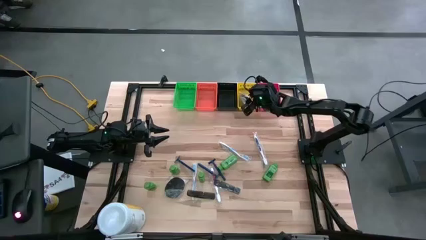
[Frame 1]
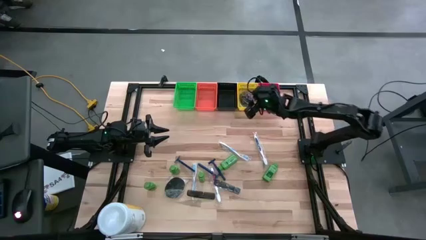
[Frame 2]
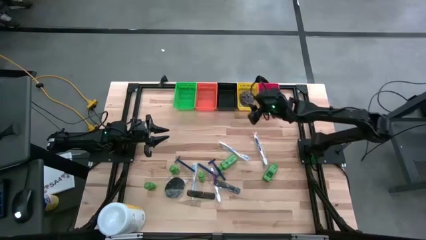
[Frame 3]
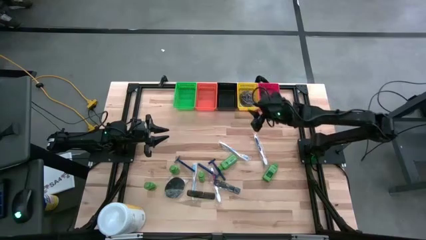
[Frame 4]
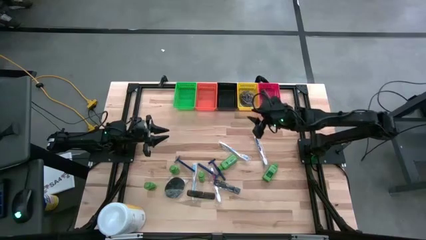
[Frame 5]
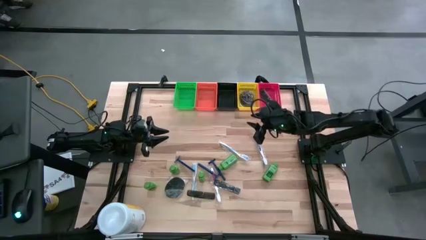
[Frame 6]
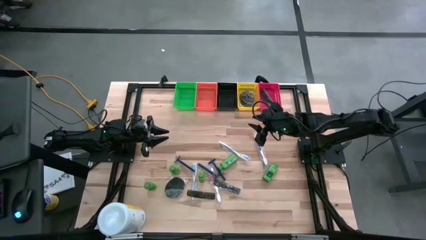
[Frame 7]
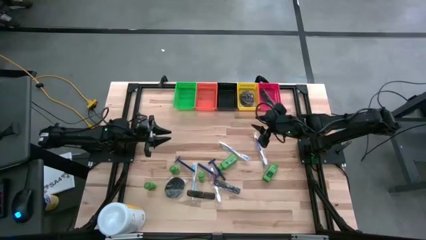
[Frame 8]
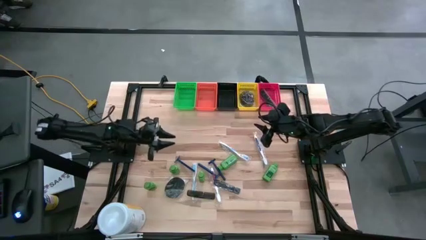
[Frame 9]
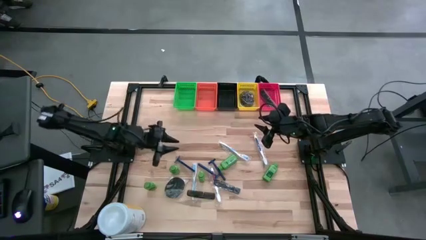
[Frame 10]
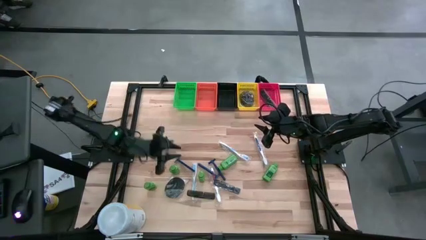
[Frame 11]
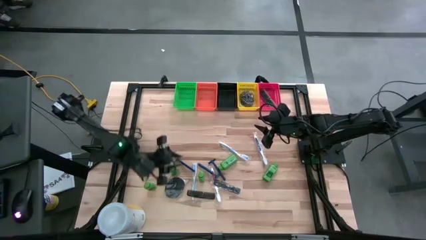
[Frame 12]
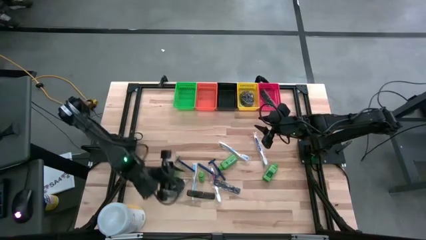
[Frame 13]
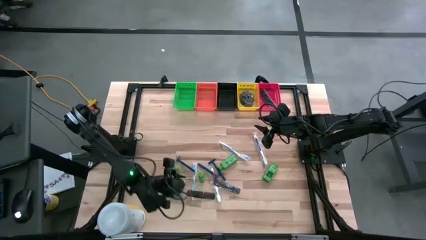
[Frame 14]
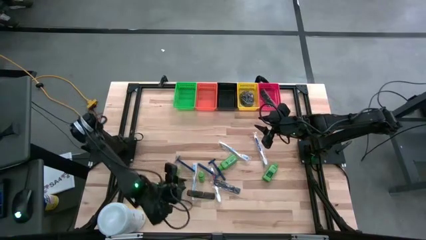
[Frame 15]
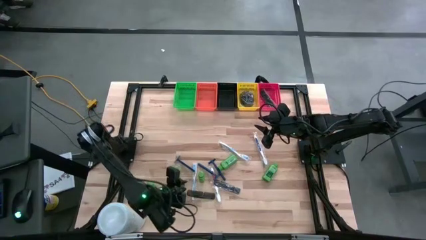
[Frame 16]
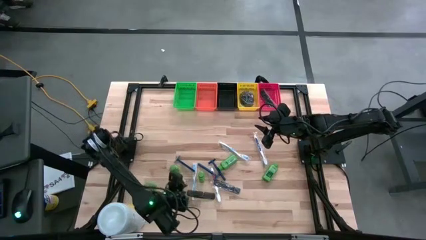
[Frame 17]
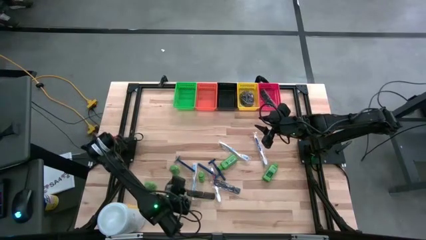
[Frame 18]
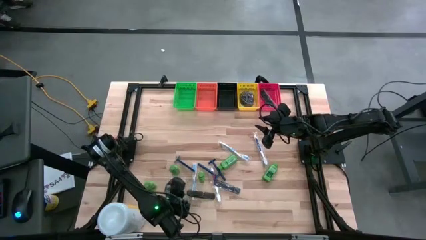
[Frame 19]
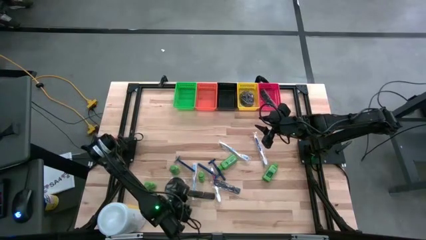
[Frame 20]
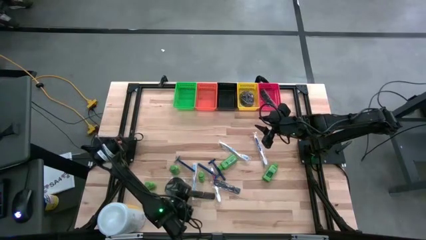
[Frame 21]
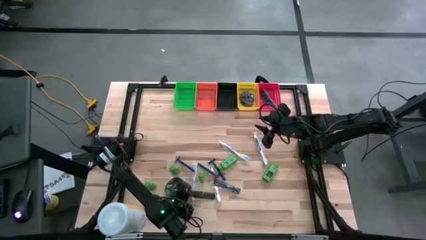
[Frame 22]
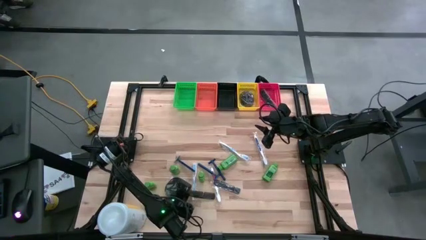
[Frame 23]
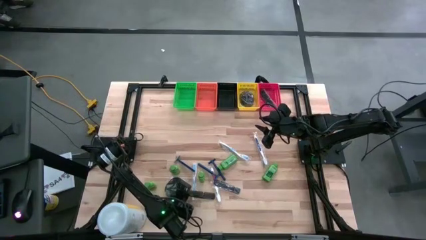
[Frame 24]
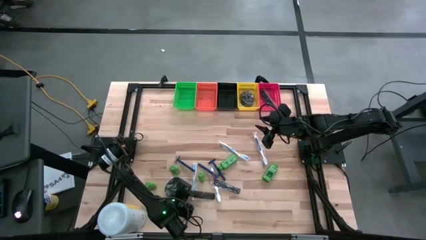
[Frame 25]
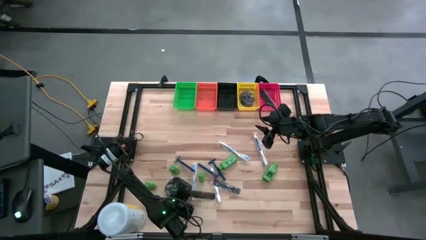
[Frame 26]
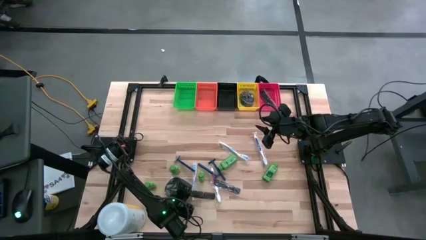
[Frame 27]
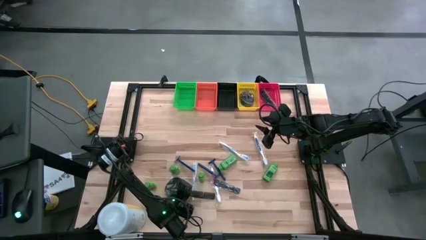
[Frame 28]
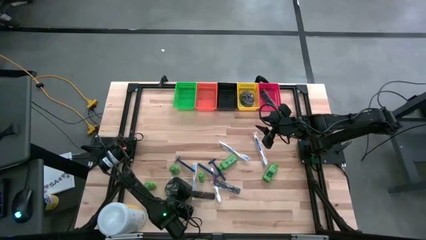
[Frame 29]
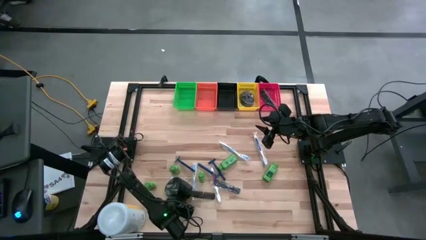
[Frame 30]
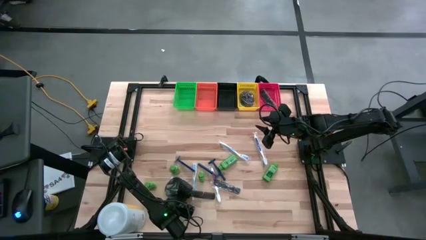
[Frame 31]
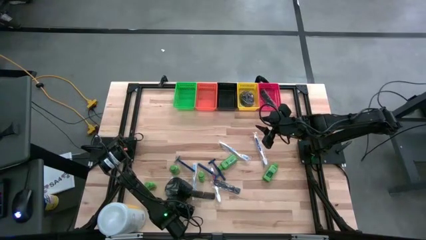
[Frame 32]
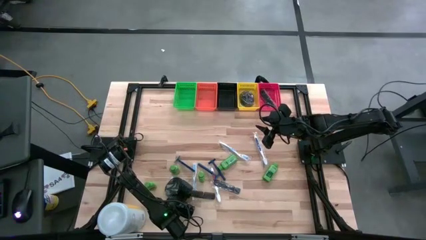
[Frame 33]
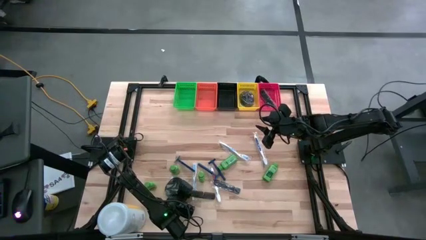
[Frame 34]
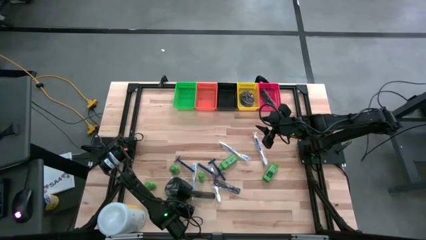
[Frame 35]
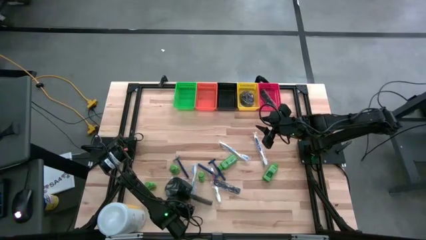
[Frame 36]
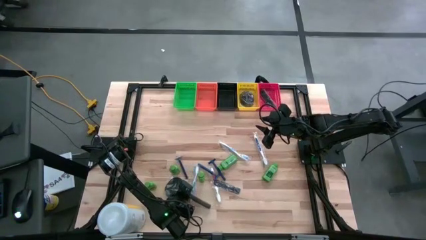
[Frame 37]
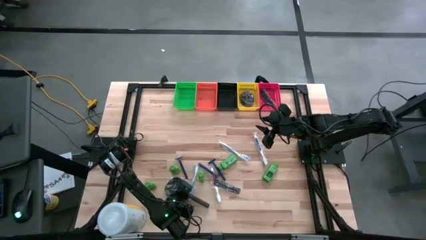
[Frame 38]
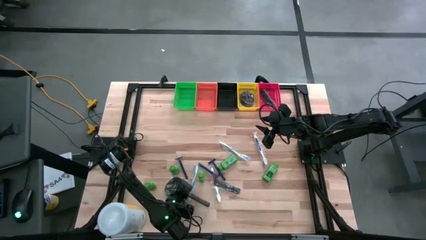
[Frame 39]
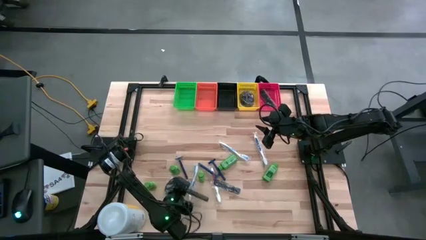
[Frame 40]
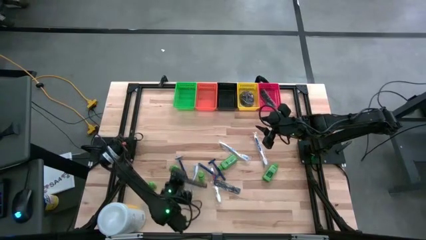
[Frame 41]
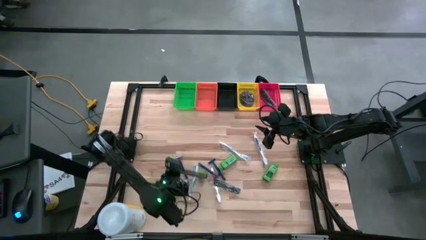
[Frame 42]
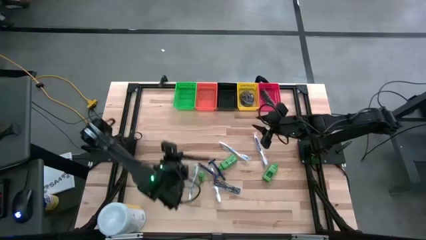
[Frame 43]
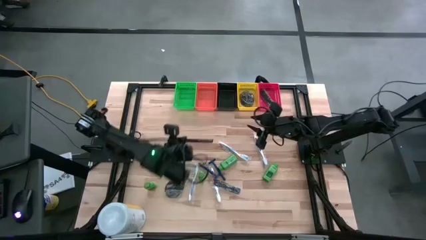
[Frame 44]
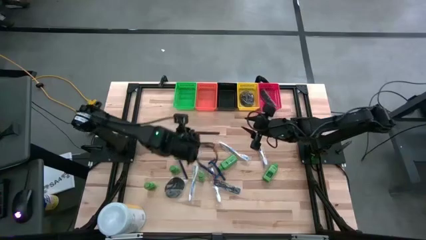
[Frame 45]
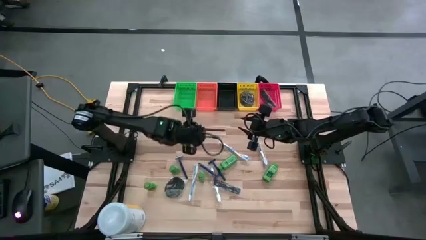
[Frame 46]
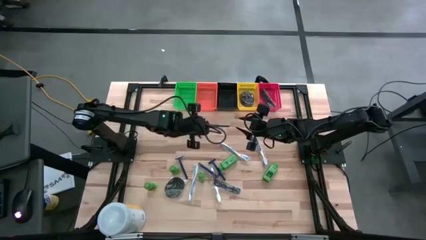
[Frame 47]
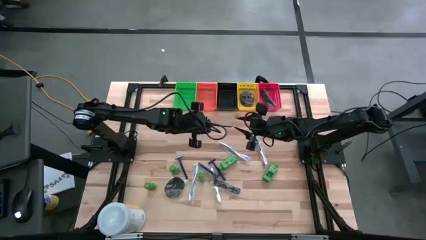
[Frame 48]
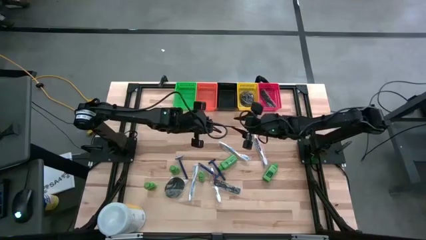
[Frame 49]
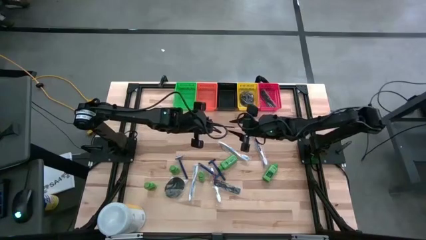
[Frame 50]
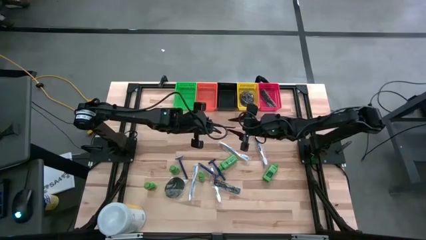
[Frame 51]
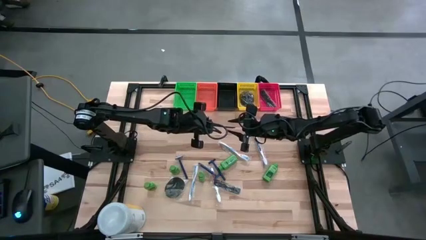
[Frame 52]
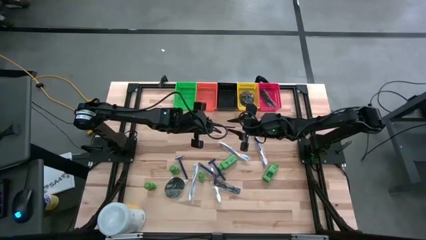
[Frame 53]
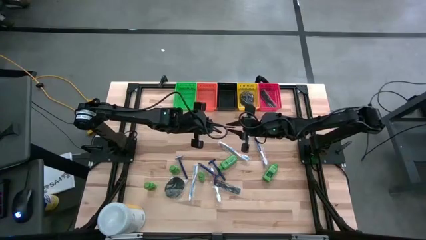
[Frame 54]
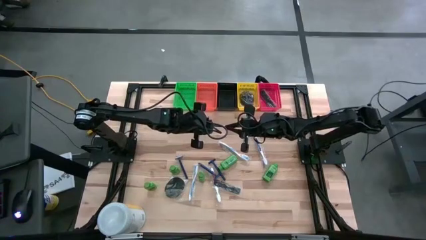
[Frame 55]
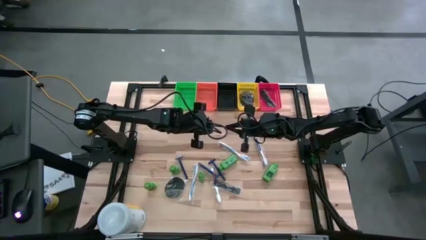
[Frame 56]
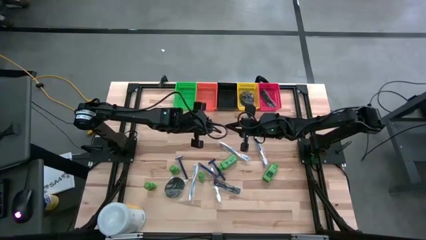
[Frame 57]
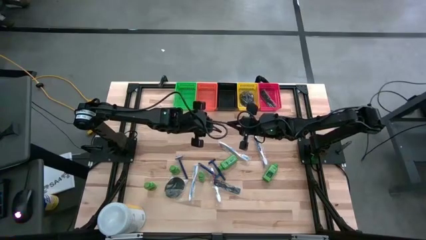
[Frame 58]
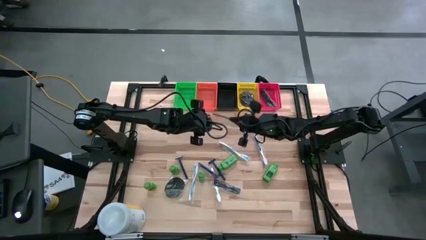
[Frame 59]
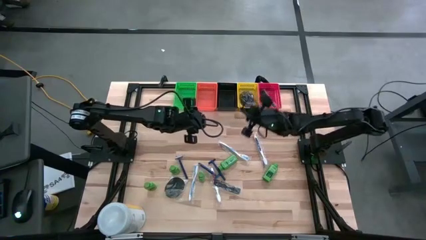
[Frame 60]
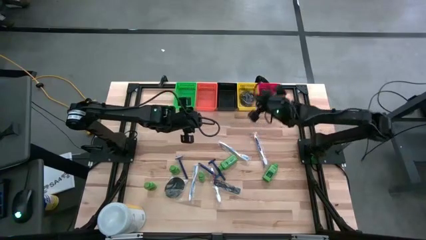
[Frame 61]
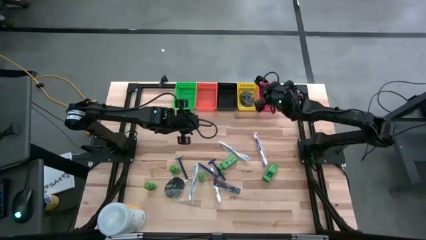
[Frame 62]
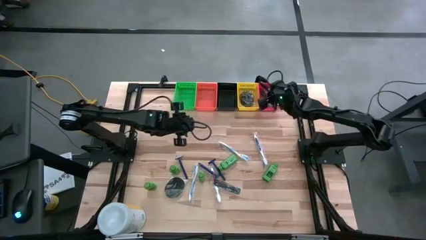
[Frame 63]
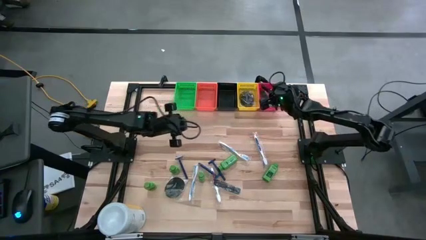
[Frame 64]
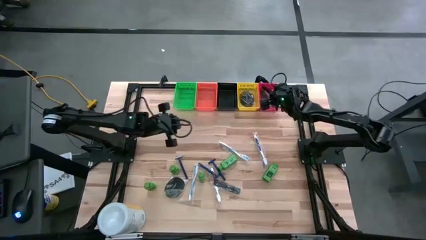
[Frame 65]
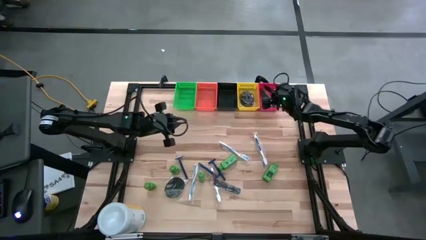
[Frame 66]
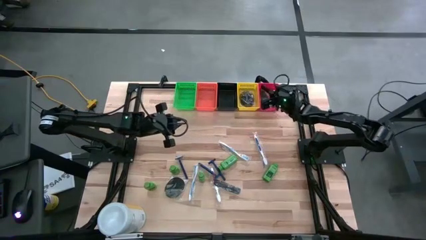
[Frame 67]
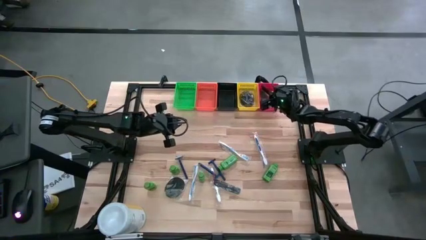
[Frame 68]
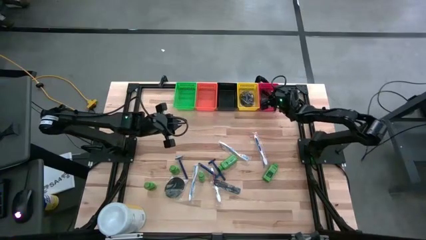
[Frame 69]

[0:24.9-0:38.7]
Task: Pick & Place Travel size toiletries
Put the black comb into the red bin
